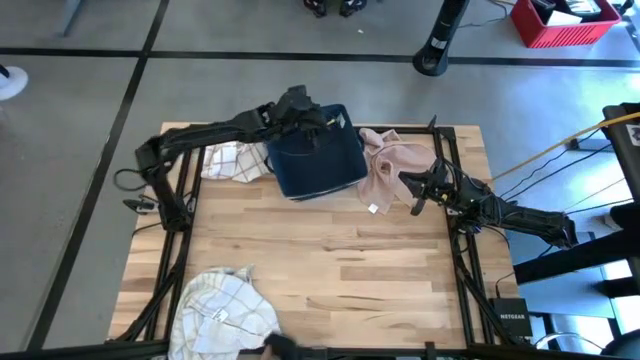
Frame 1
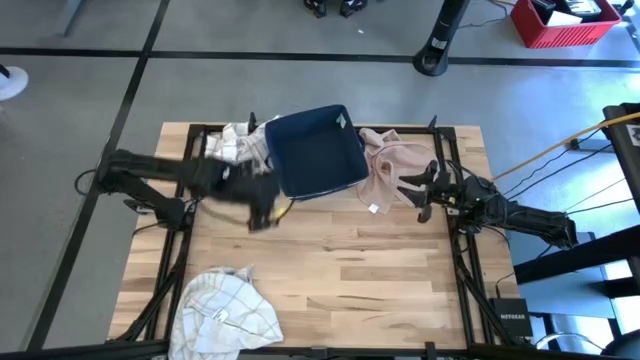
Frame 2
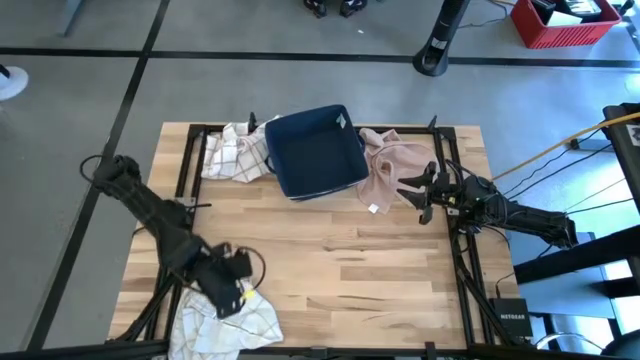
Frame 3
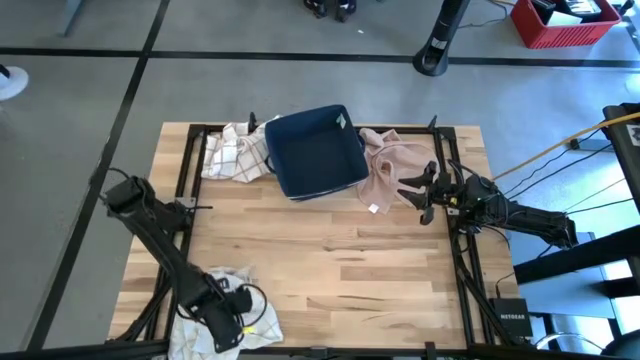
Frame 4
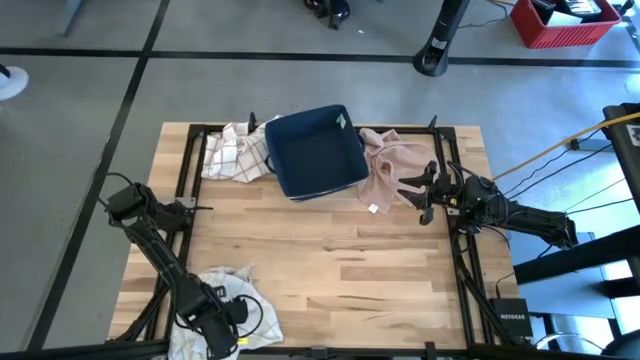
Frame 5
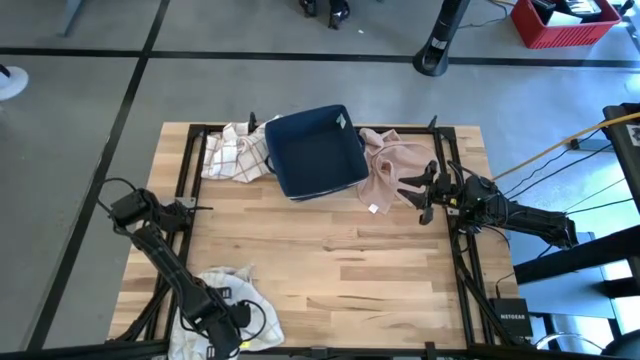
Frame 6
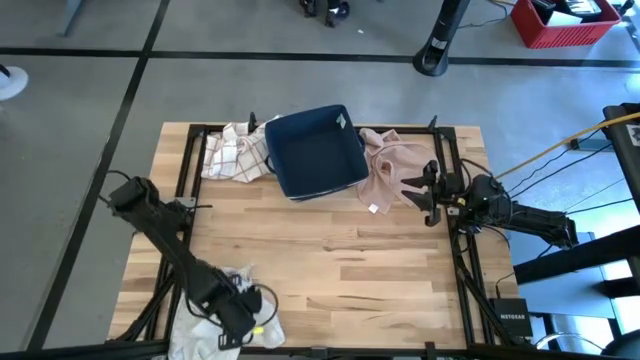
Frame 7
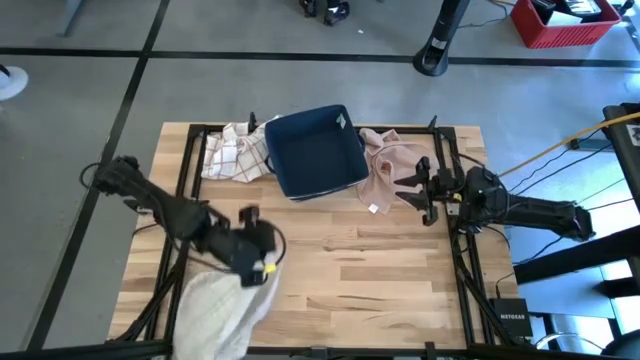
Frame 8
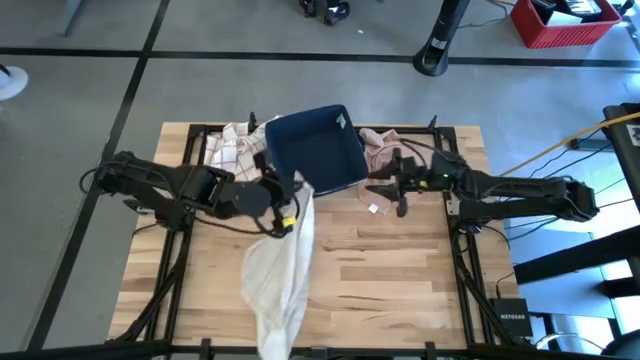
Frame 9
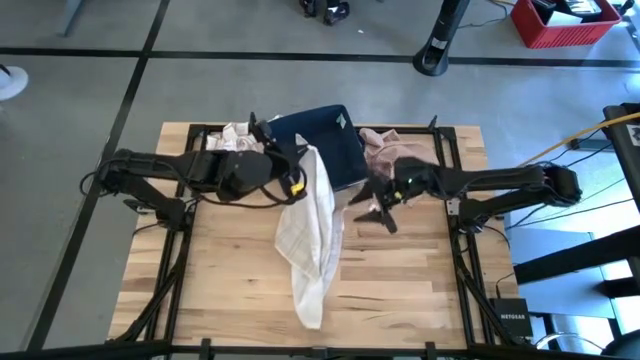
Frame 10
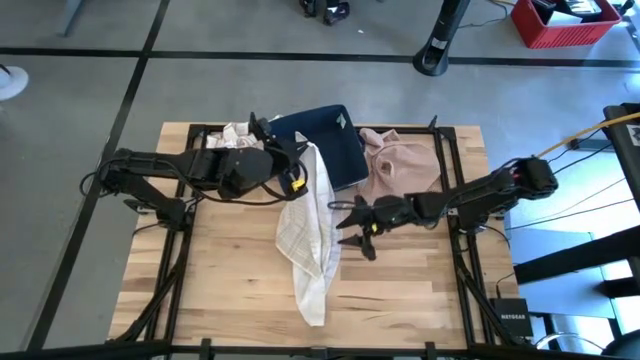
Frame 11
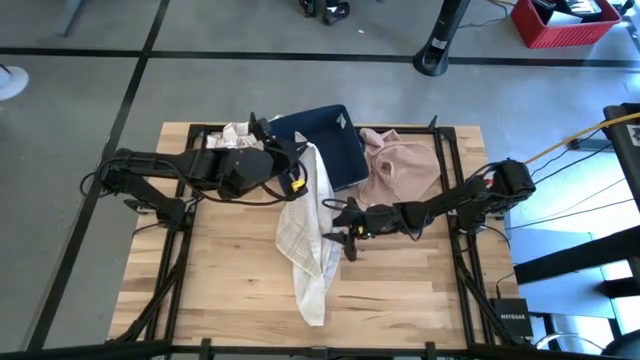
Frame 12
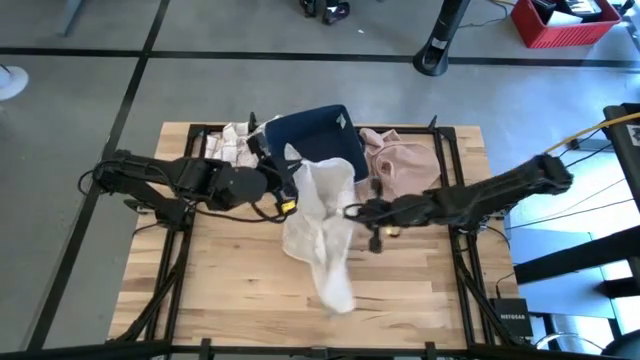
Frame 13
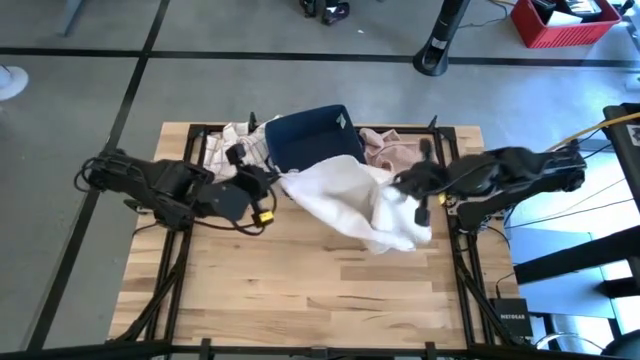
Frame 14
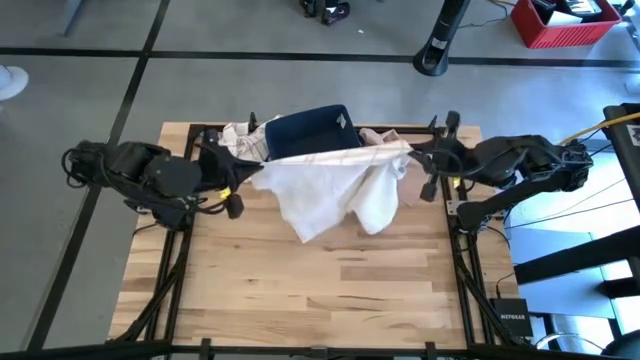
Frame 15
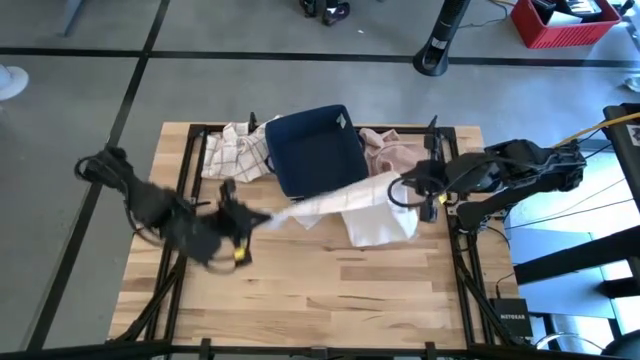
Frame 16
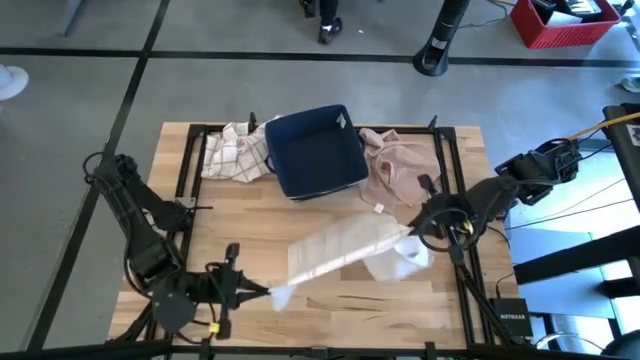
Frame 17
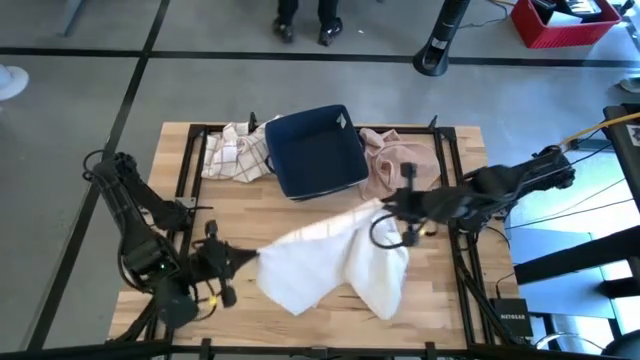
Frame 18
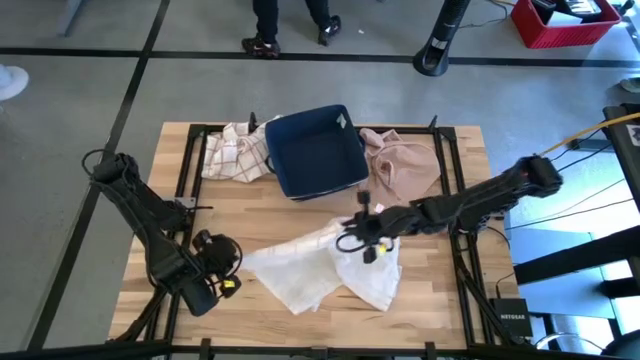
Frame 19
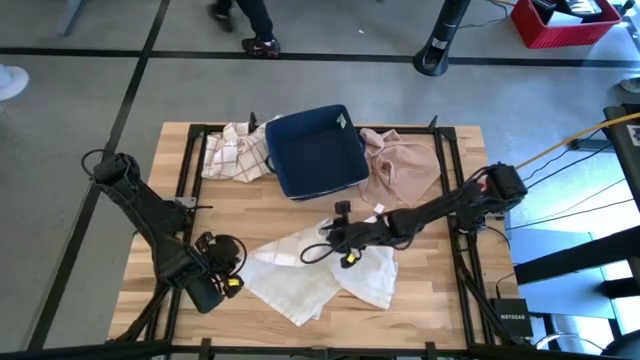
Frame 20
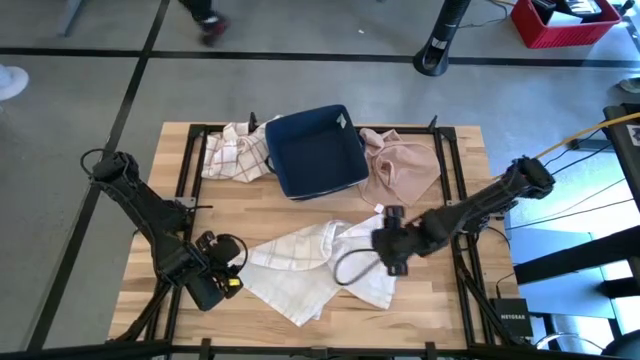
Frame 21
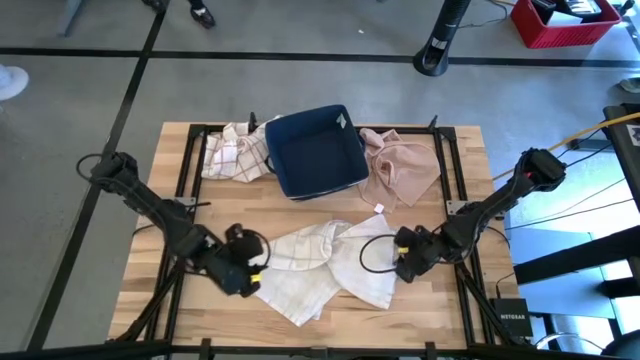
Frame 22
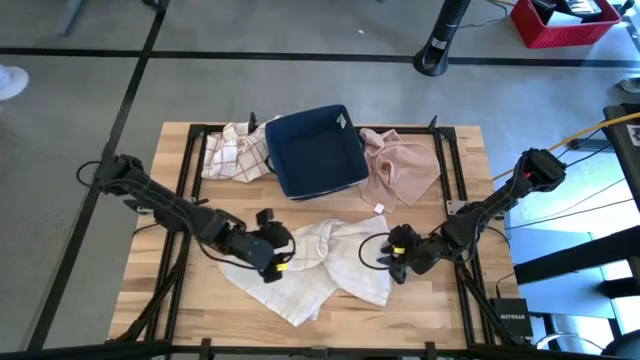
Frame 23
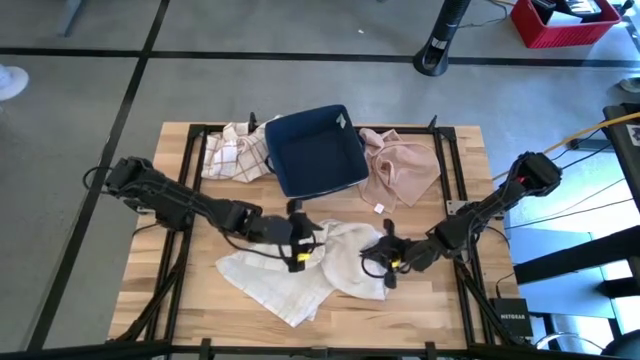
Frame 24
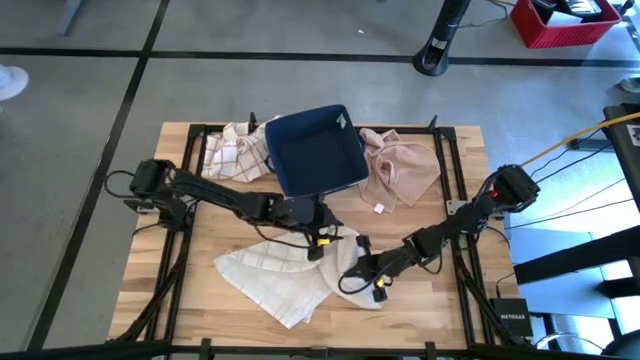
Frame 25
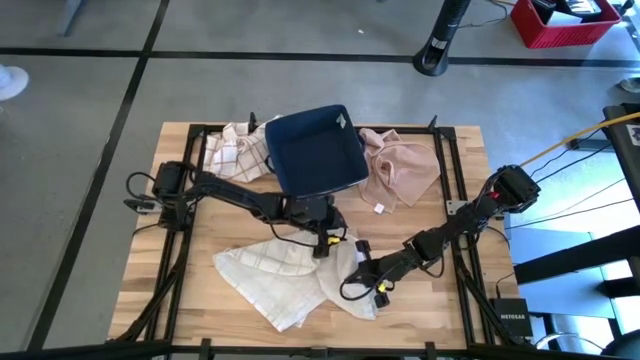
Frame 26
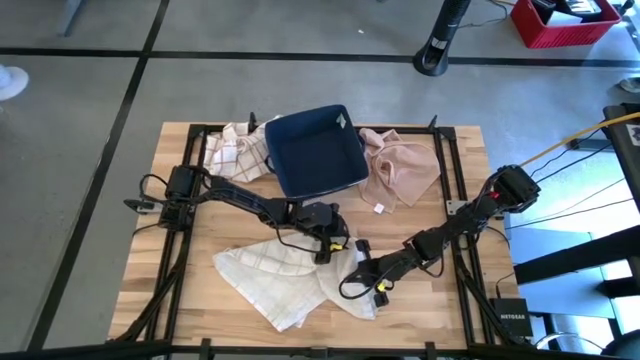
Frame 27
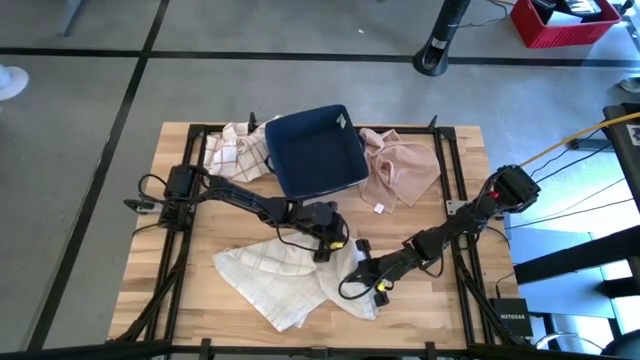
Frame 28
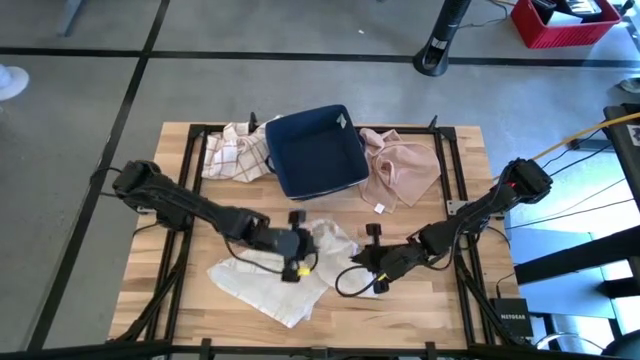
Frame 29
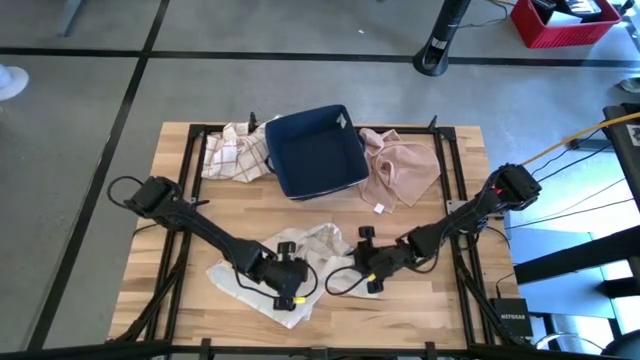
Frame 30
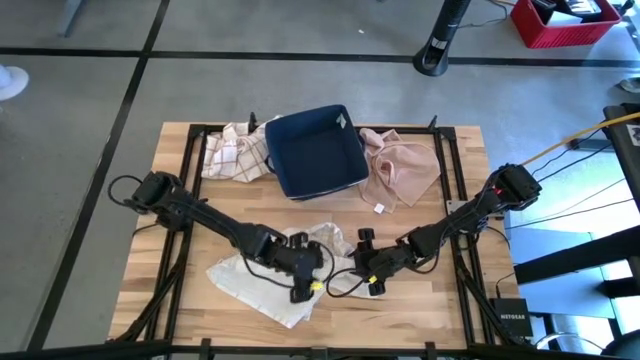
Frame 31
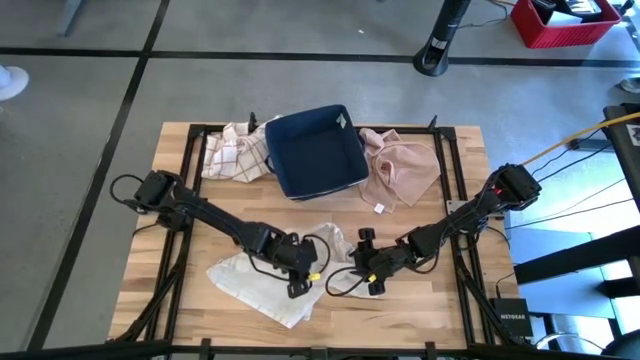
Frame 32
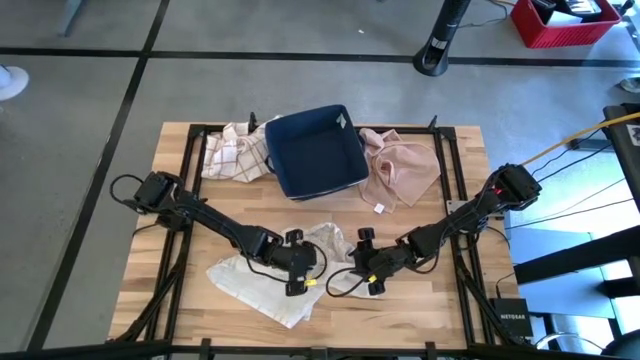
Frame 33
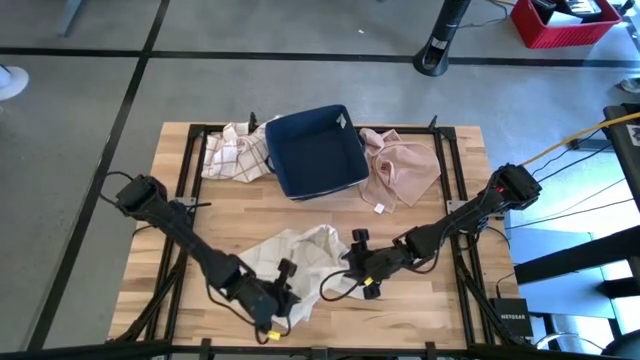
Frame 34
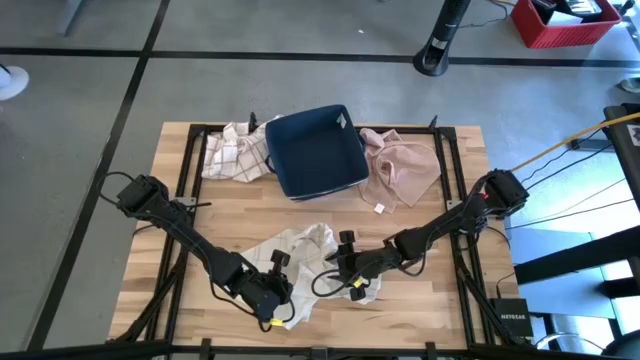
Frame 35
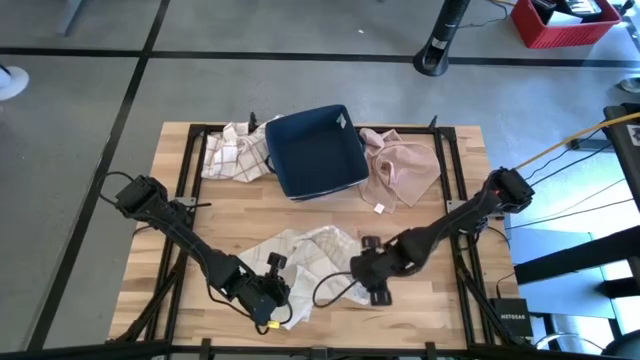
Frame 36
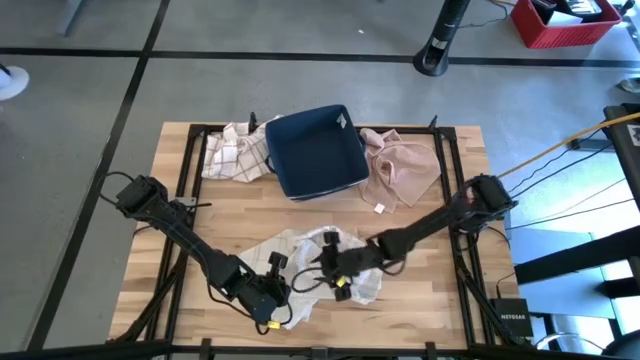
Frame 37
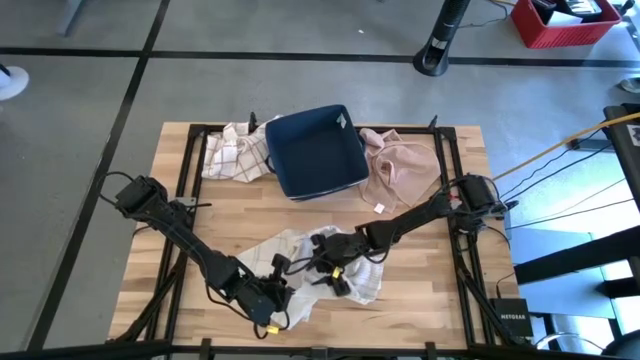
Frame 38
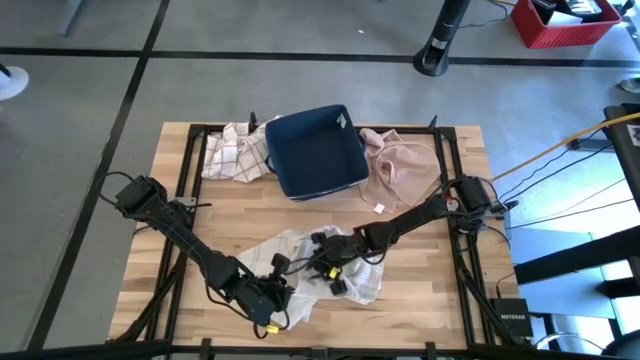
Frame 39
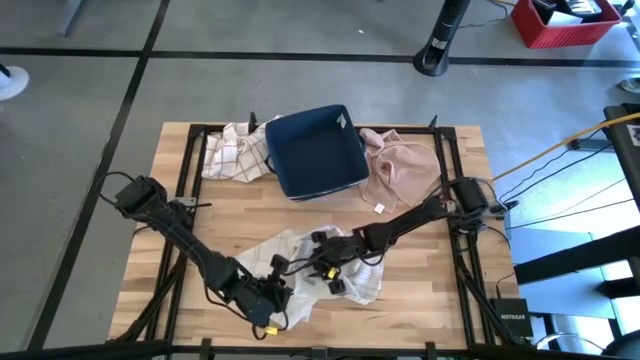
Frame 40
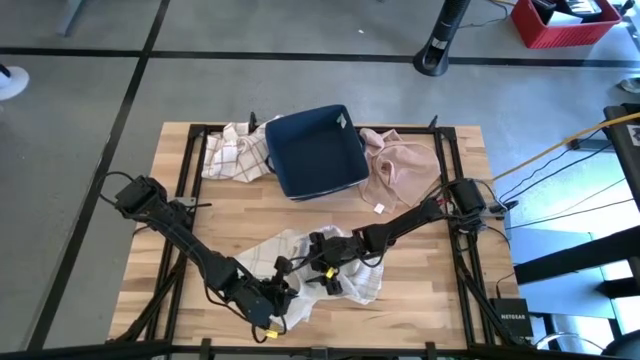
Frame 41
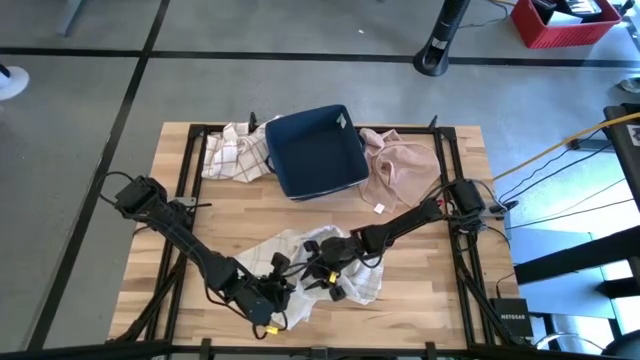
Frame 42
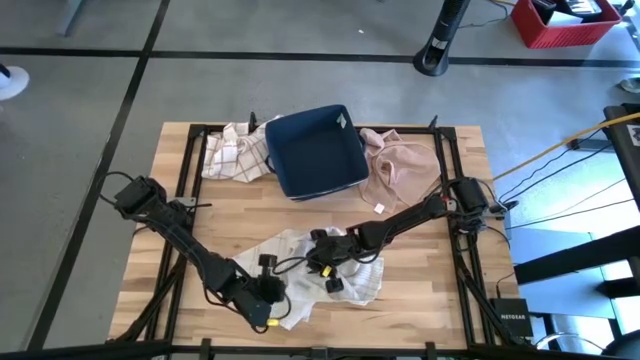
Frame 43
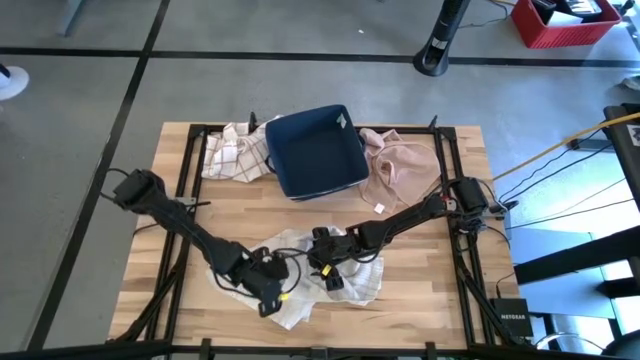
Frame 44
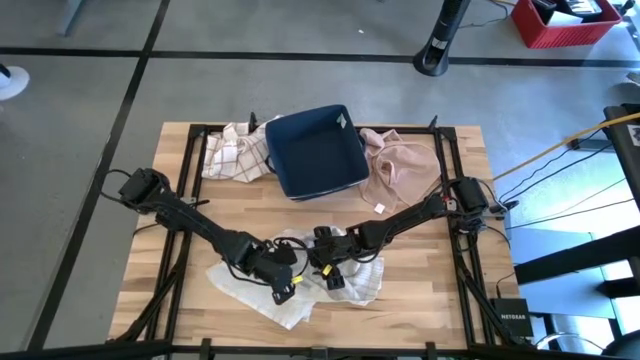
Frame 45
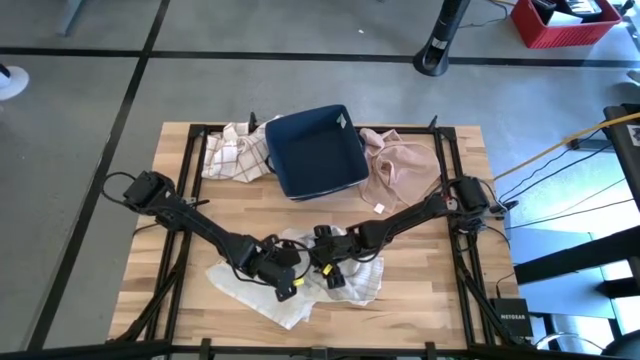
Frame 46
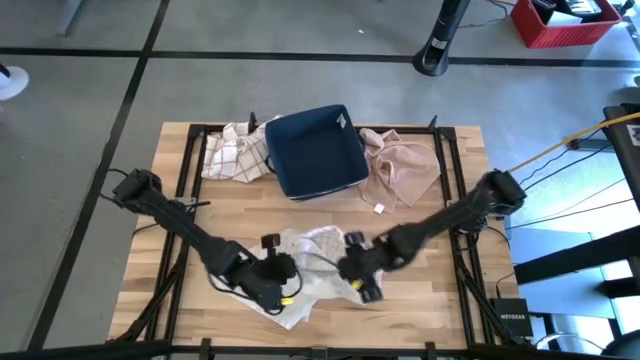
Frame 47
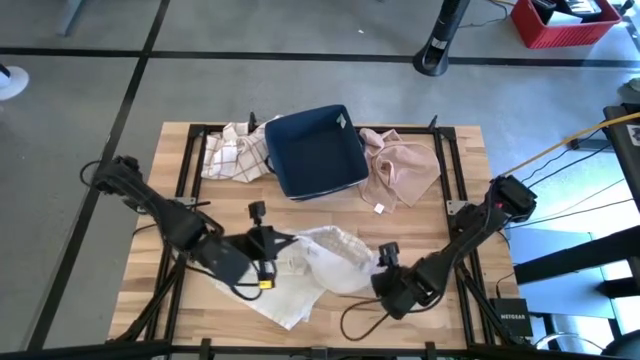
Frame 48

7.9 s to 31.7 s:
Task: Fold towel
Fold the white with gray pattern towel on the table
